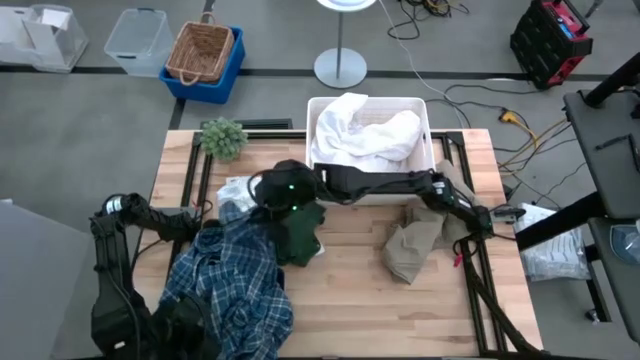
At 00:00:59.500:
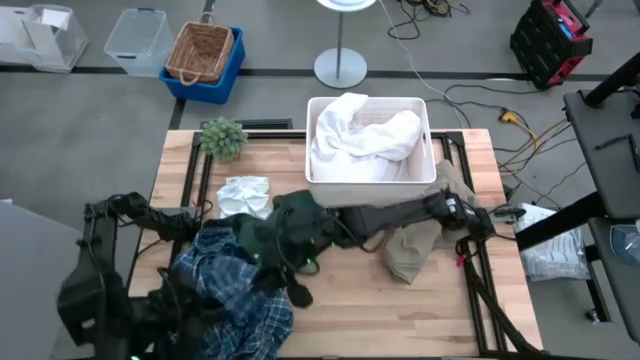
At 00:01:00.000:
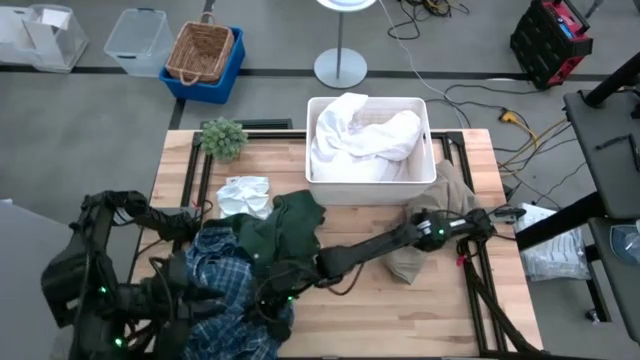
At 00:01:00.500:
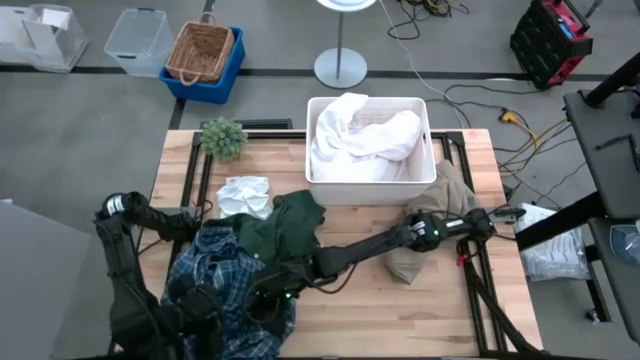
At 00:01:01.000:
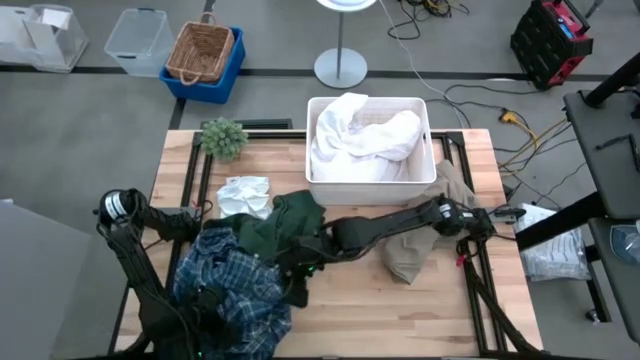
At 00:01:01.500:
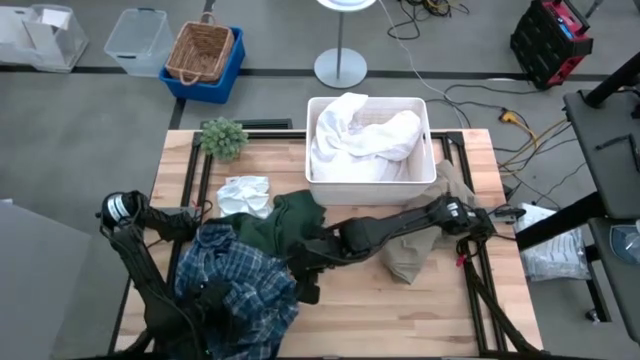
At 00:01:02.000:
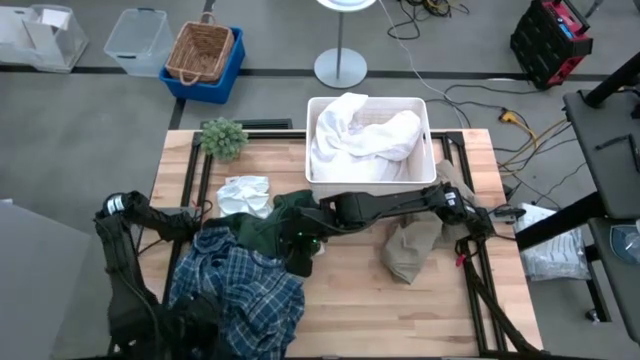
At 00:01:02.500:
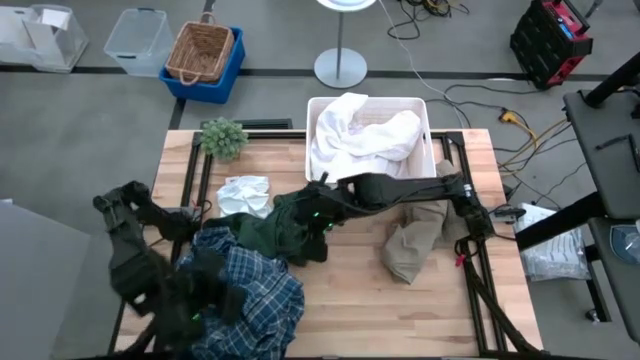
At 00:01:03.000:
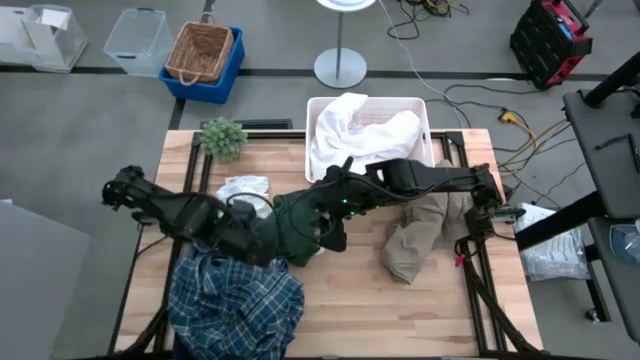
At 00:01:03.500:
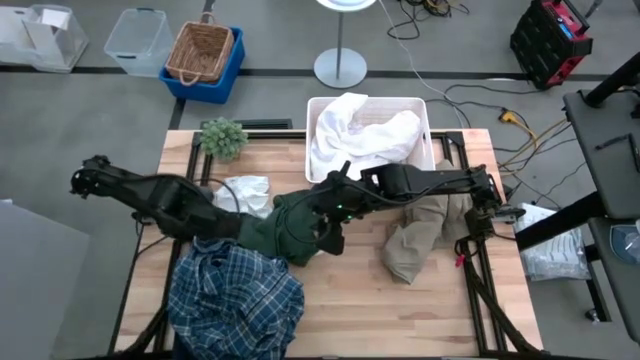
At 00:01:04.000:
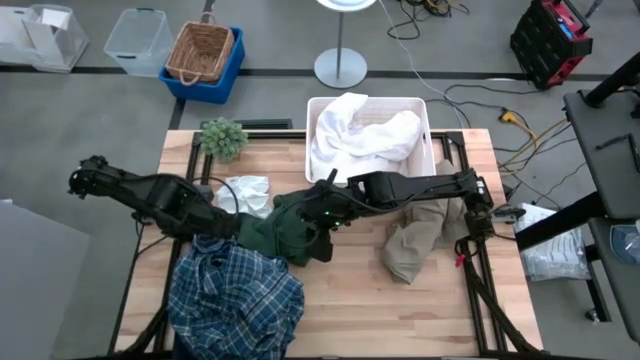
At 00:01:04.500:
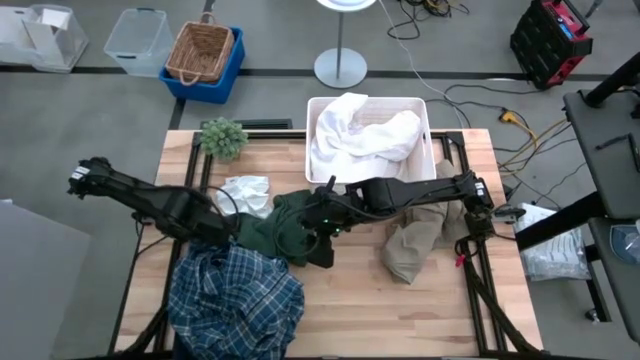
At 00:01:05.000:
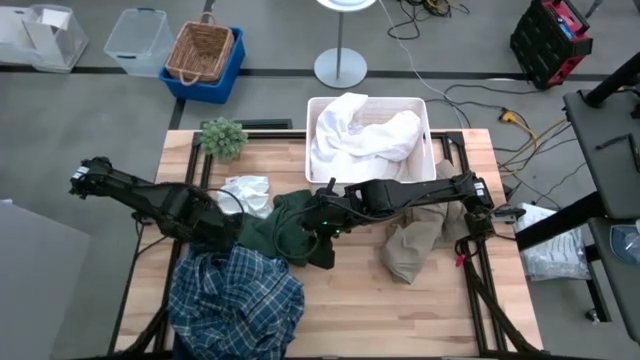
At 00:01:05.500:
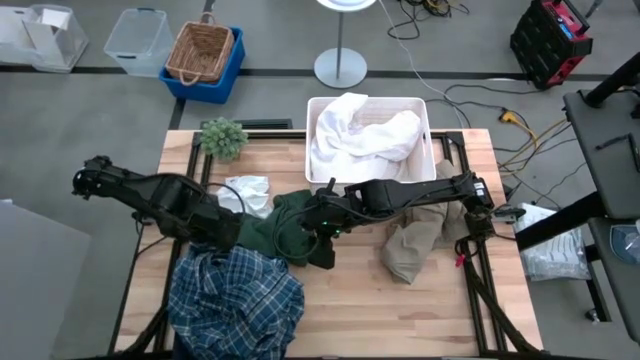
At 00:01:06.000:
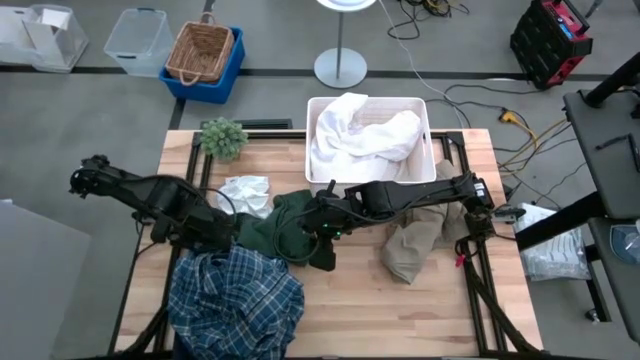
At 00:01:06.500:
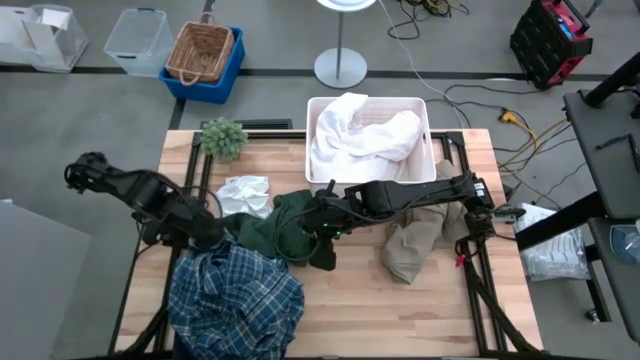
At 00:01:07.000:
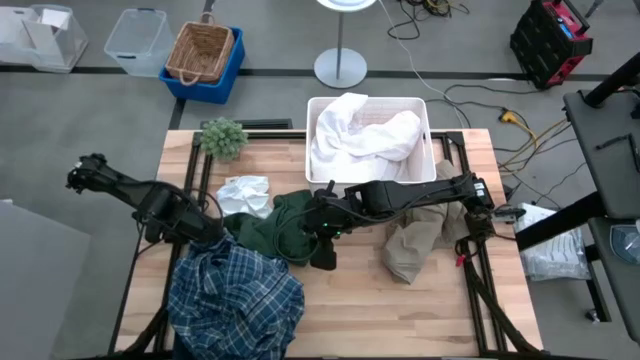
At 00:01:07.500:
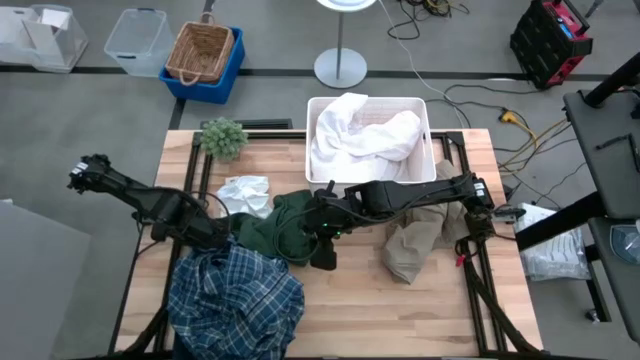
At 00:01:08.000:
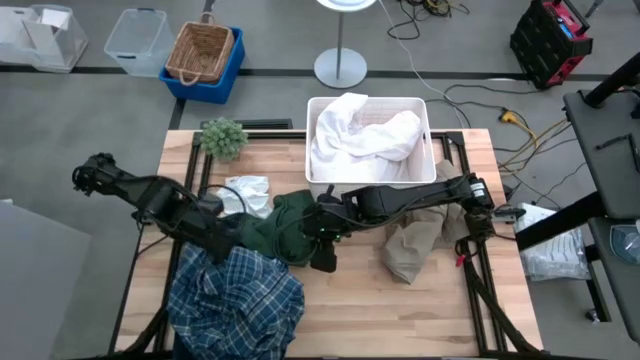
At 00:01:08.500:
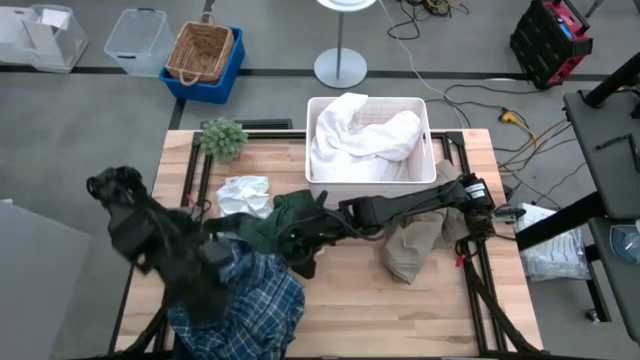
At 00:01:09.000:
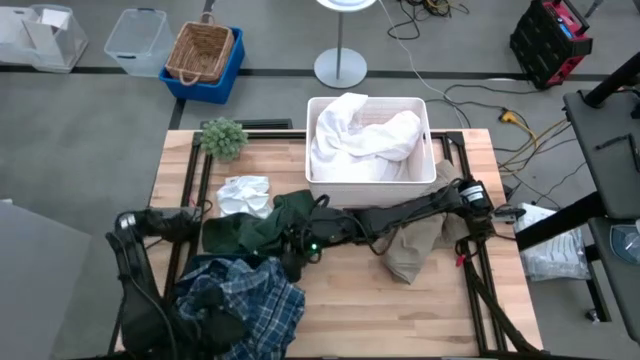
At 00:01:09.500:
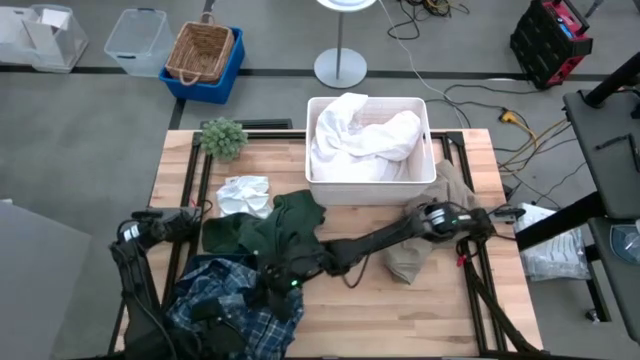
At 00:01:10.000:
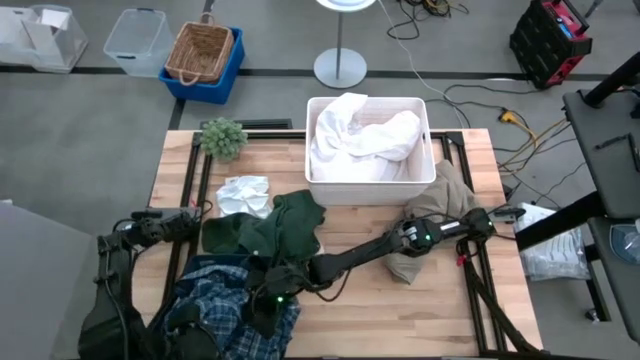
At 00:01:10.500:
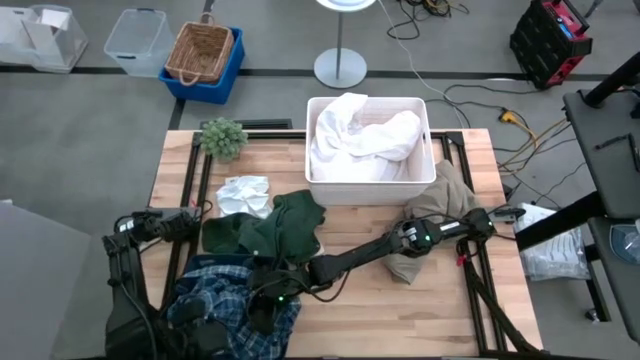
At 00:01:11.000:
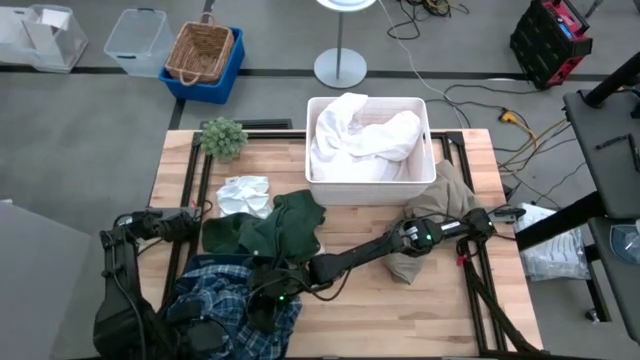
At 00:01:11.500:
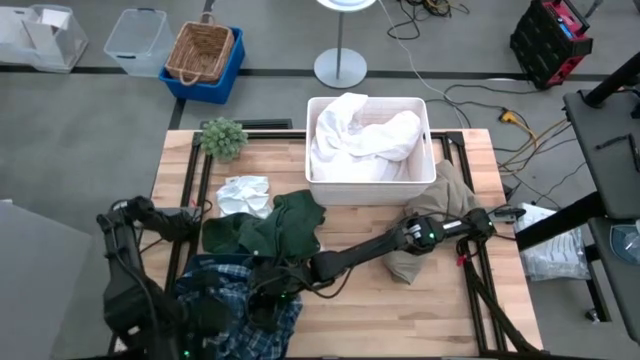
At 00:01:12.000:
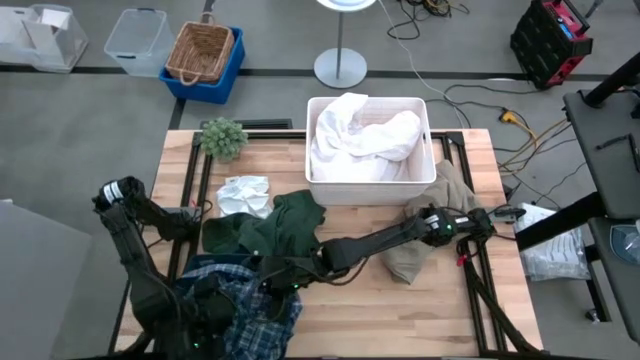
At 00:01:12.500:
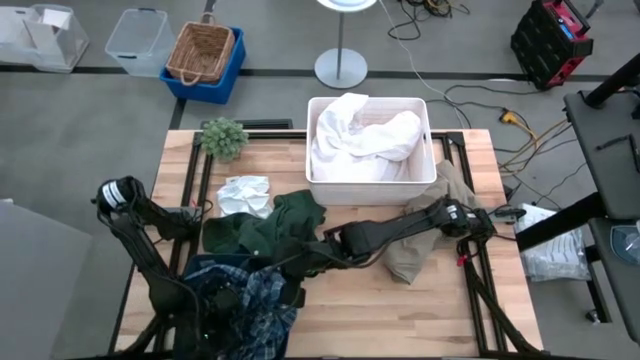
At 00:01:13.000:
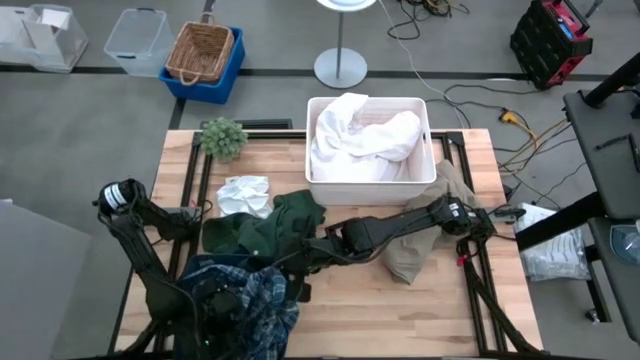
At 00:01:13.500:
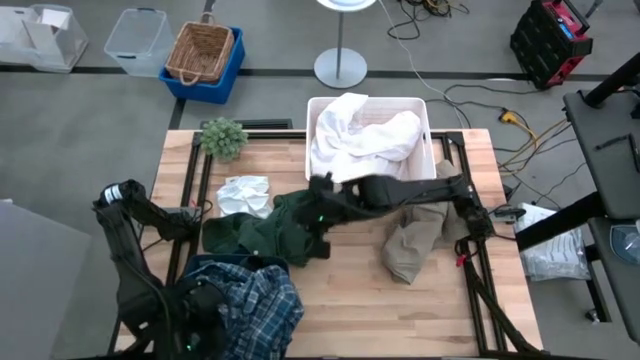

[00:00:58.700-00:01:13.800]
Task: Sort clothes
Put the blue shirt in the blue bin

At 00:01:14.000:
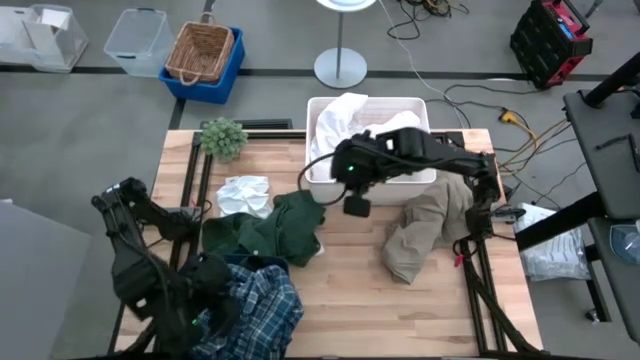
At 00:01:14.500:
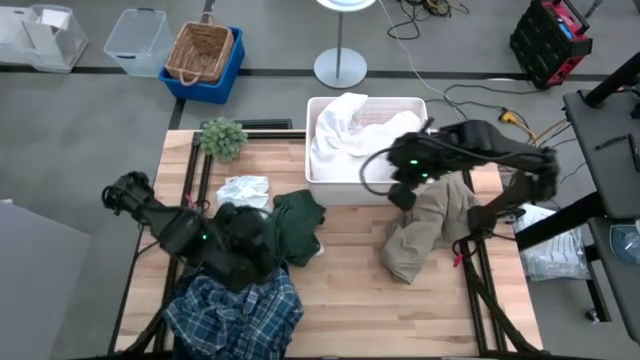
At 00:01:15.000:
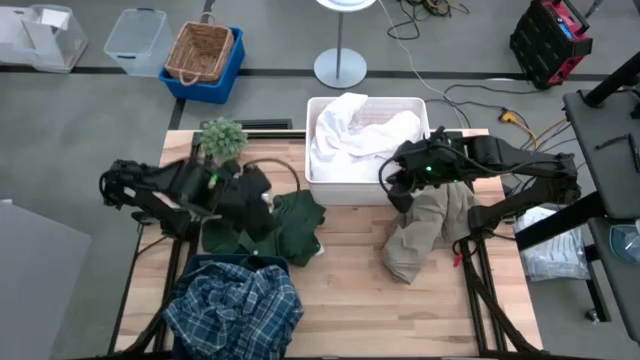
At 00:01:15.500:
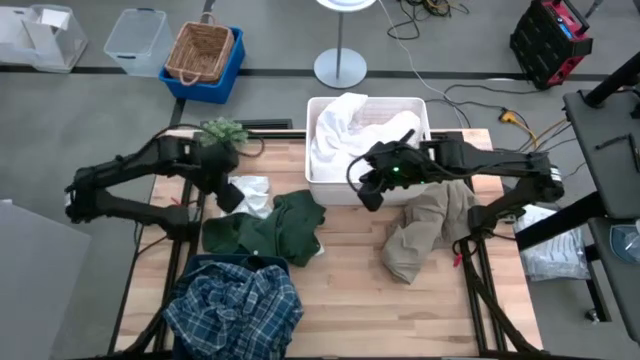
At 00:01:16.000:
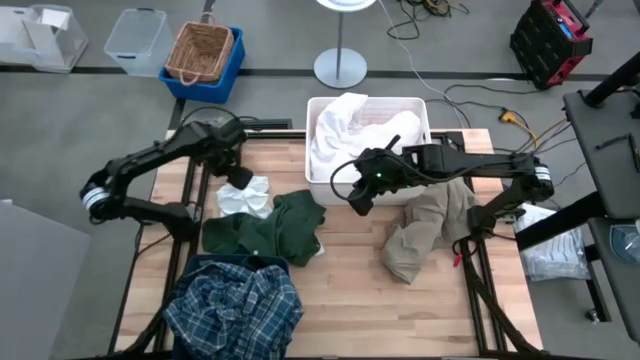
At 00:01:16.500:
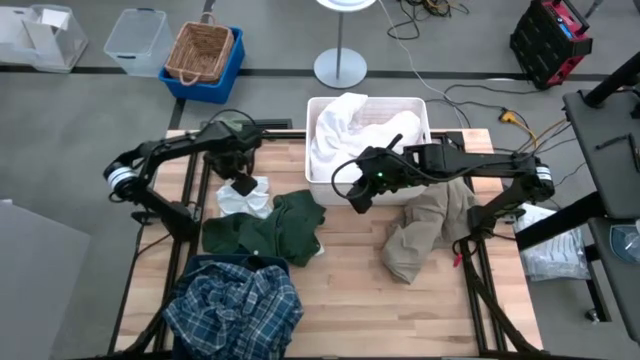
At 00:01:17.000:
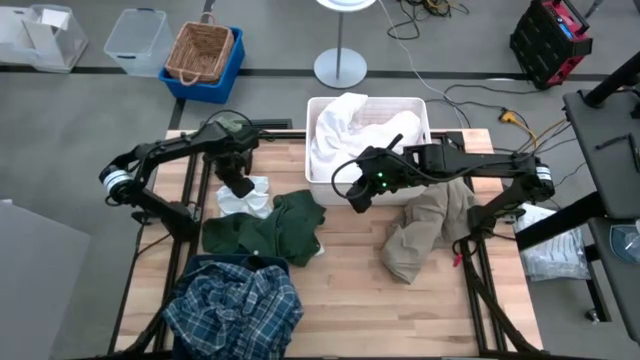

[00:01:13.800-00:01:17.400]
Put the white shorts in the white bin

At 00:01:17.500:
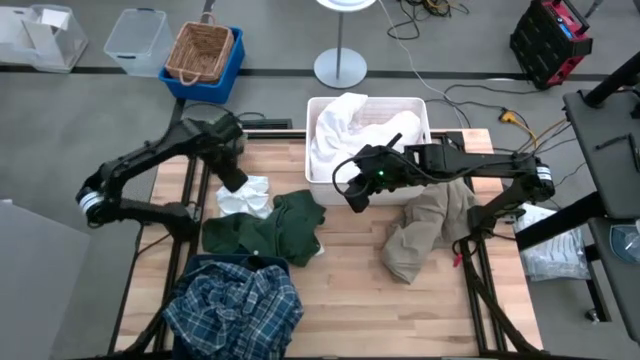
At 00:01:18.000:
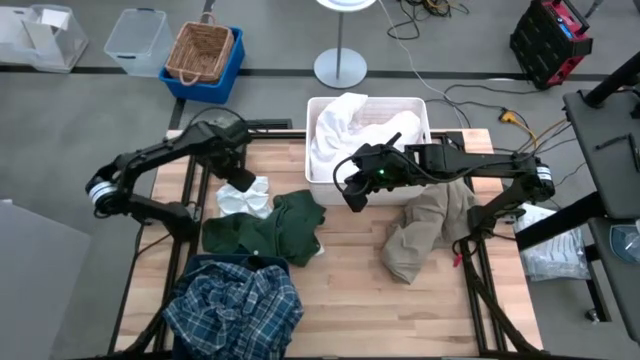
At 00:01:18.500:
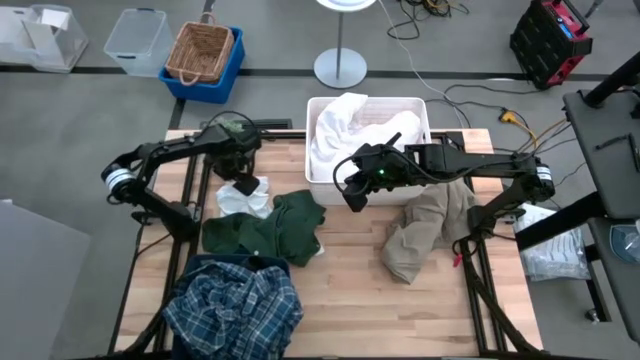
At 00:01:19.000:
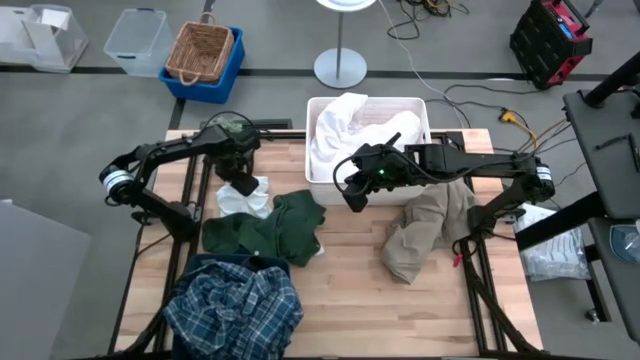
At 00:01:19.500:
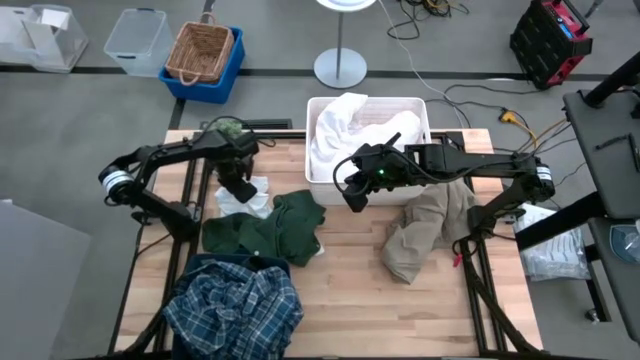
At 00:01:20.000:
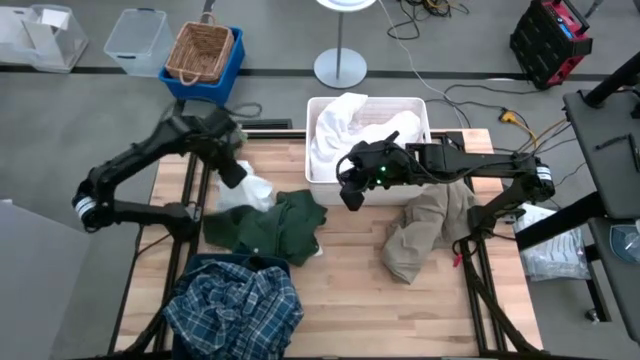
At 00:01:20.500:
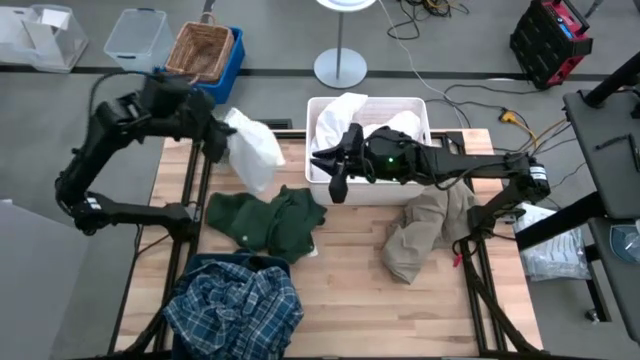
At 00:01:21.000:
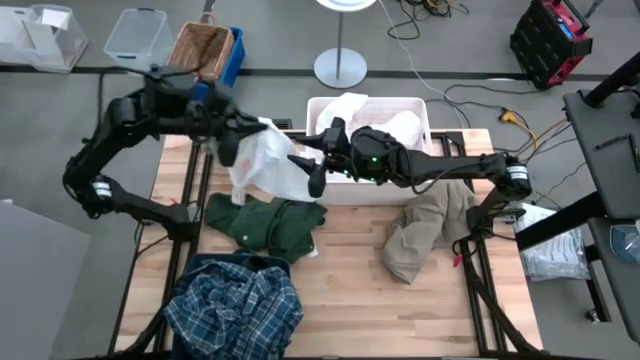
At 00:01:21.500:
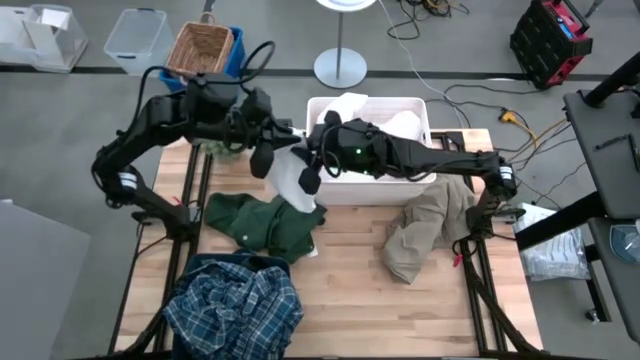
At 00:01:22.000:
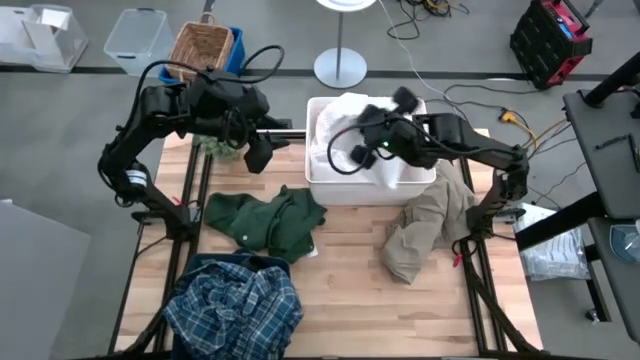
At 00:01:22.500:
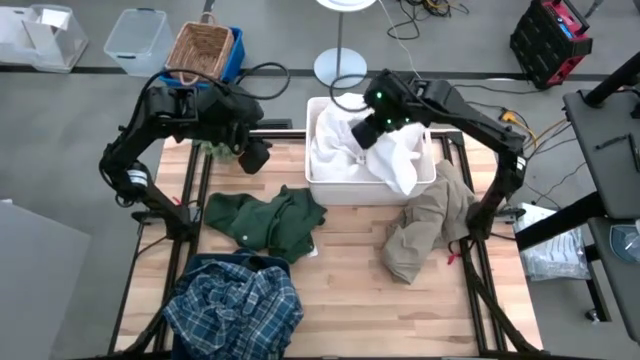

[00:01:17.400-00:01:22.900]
Put the white shorts in the white bin
